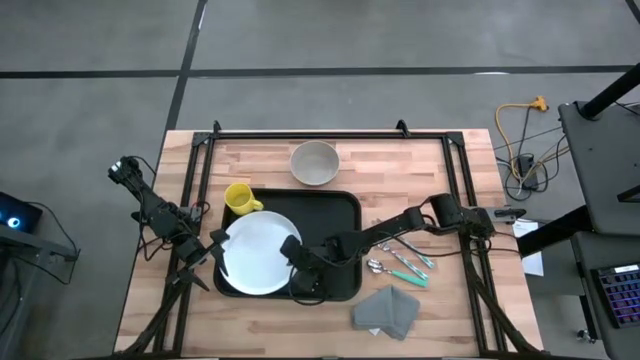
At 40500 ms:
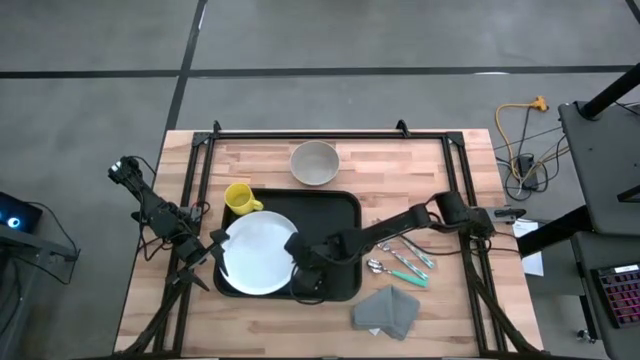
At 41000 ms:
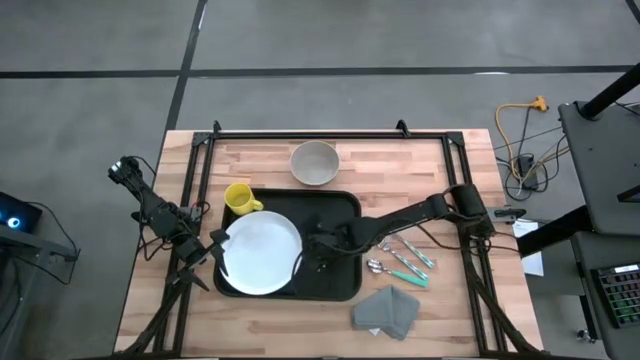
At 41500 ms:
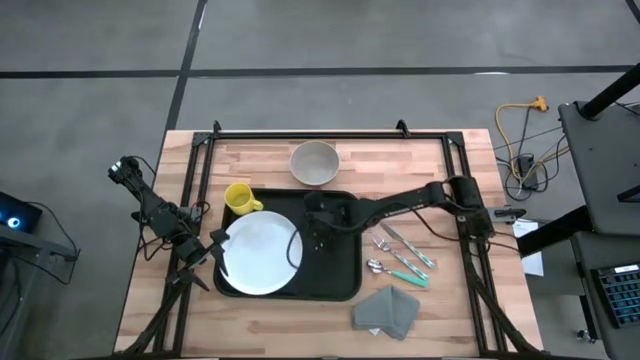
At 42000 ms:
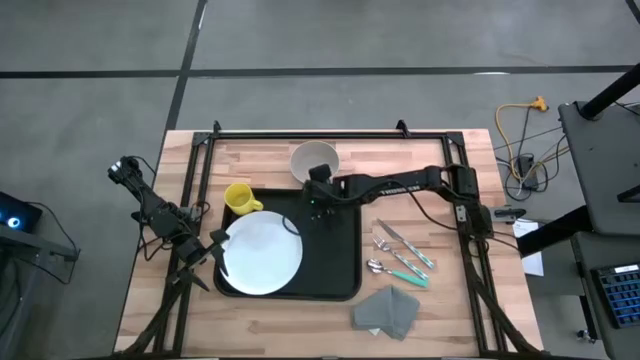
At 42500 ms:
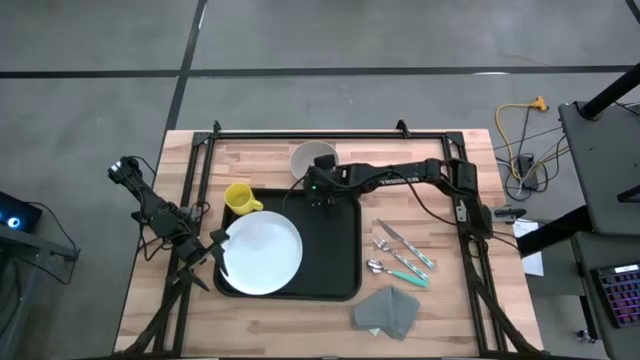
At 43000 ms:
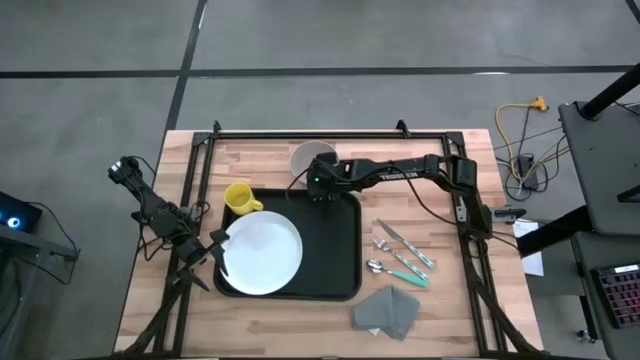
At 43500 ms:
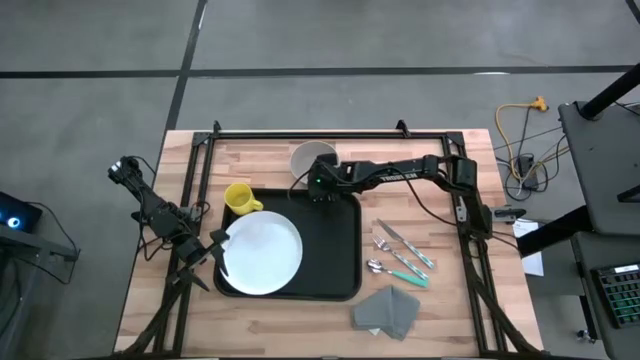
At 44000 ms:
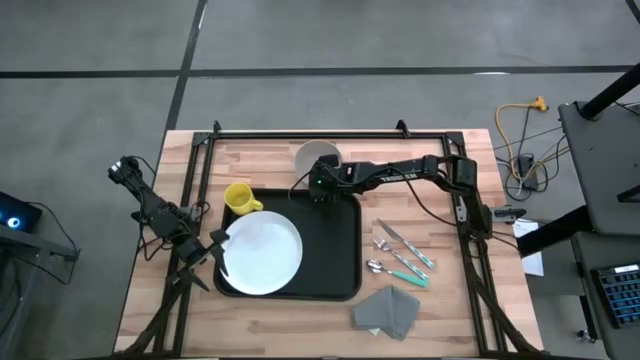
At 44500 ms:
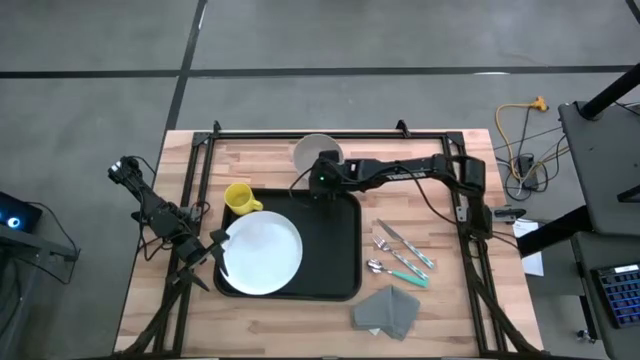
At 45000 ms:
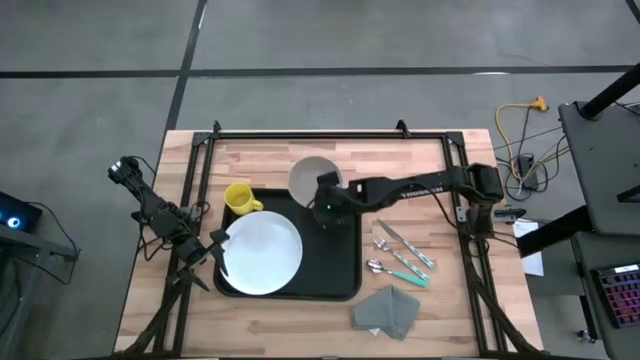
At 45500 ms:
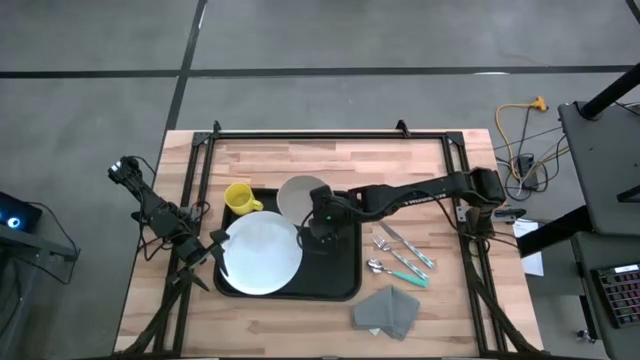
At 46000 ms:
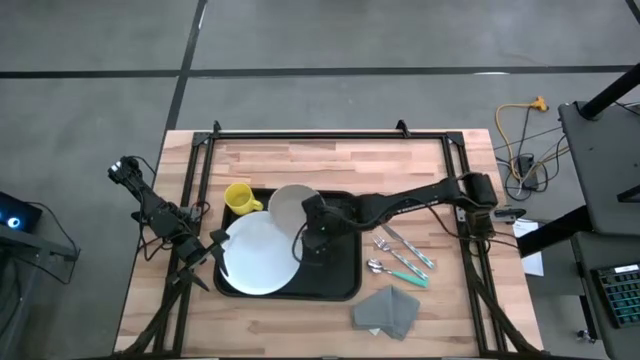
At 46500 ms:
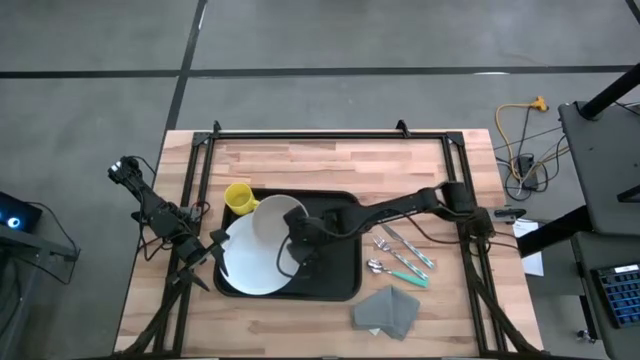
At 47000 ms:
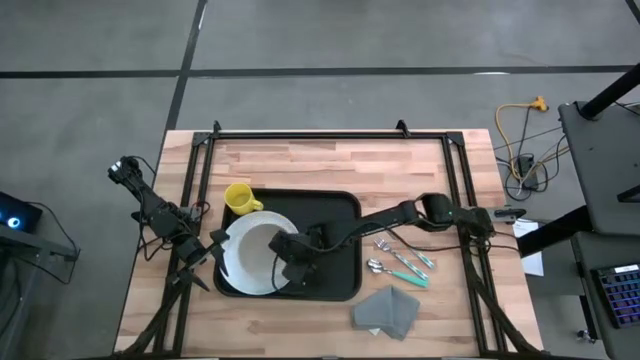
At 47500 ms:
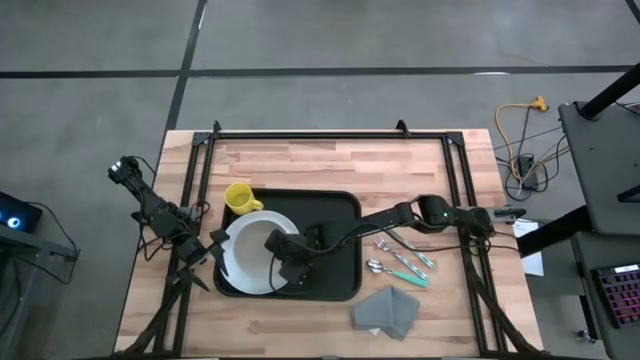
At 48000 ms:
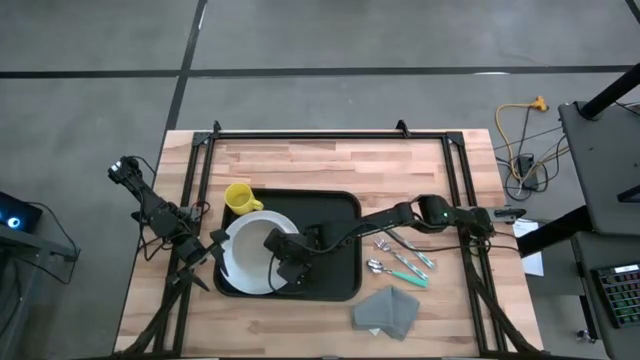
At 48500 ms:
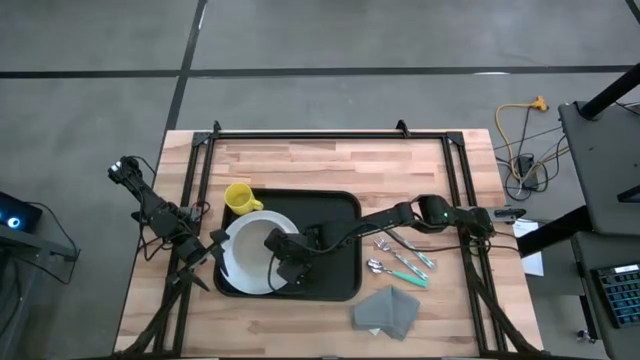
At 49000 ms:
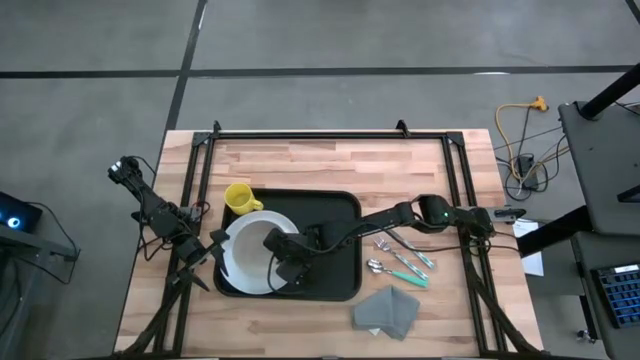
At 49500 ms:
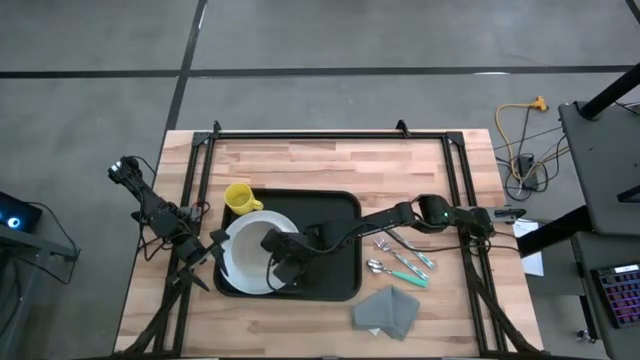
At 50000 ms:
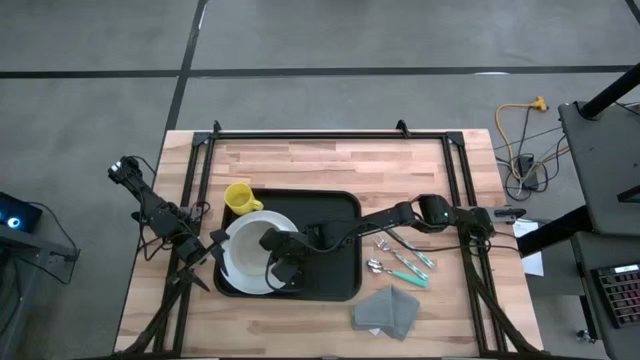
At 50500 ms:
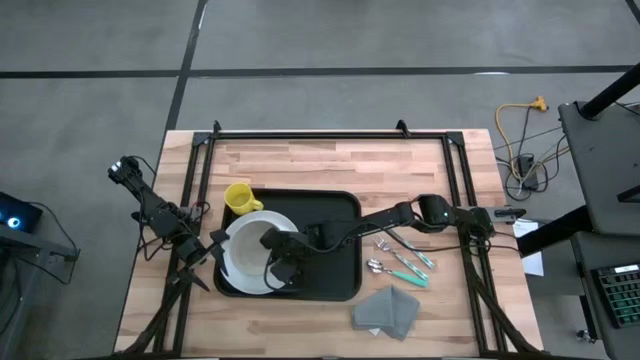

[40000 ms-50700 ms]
Task: Set up tray
Put the gray bowl on top of the white plate

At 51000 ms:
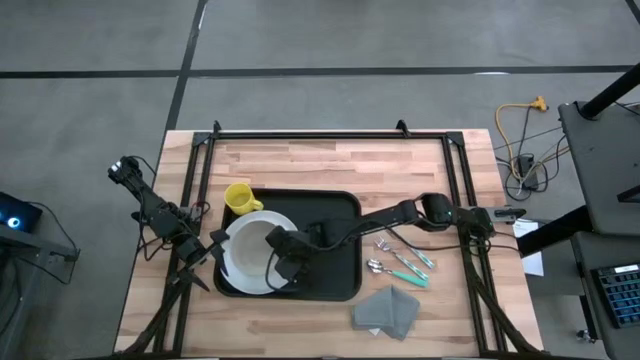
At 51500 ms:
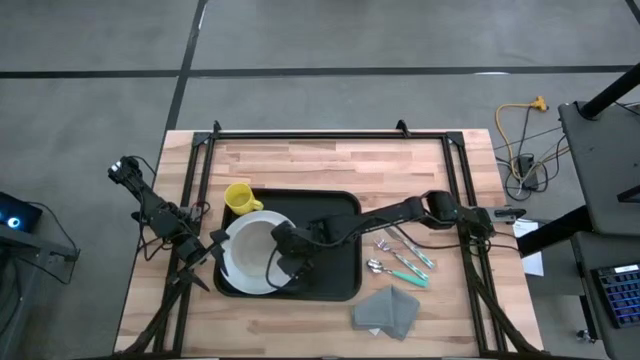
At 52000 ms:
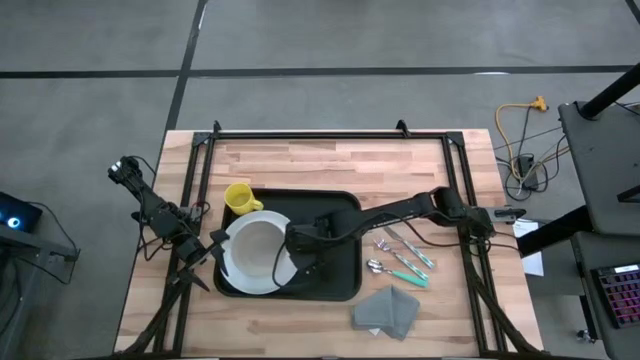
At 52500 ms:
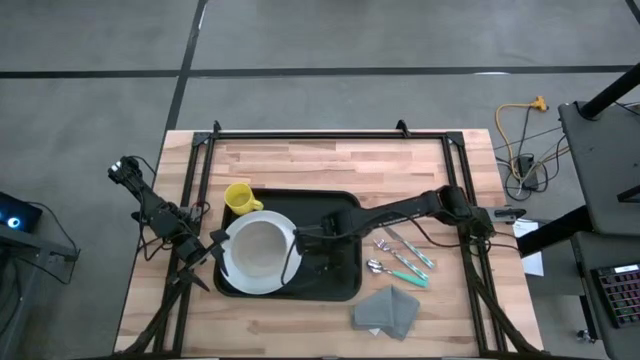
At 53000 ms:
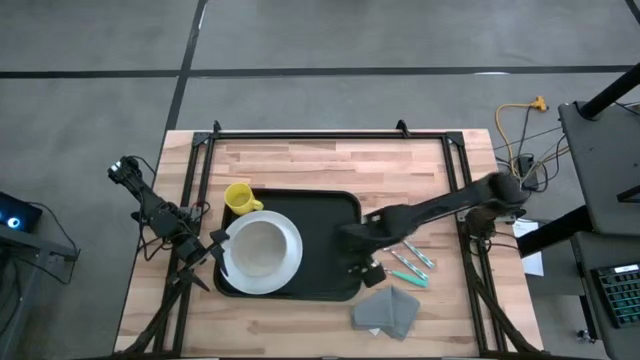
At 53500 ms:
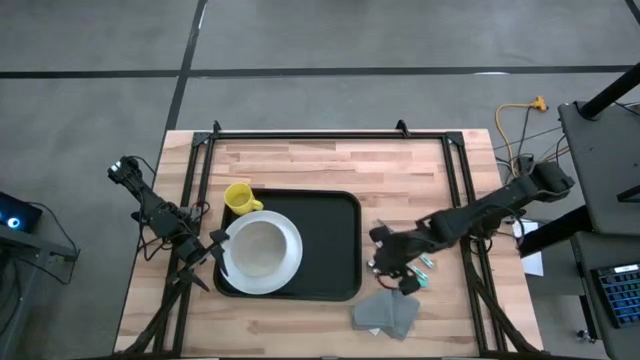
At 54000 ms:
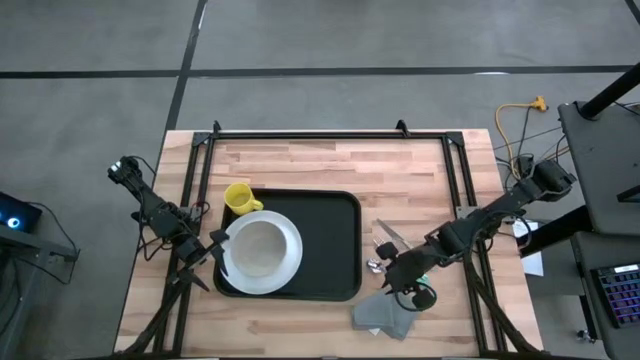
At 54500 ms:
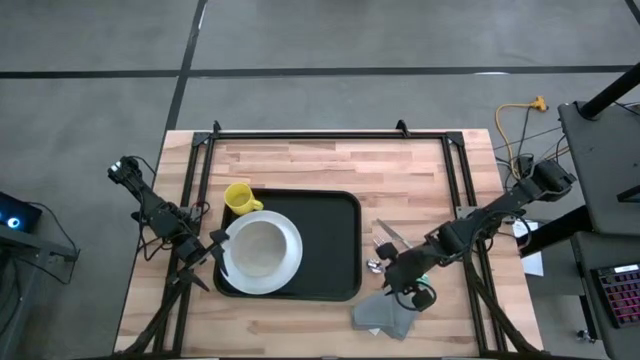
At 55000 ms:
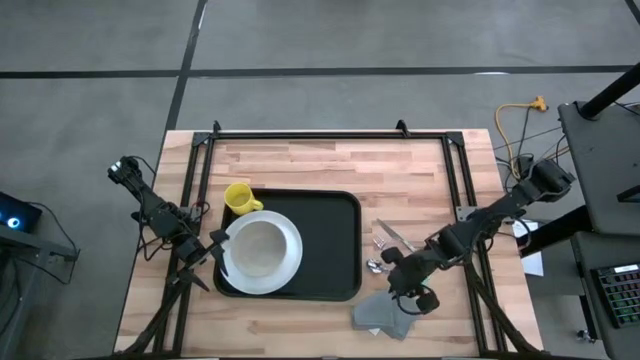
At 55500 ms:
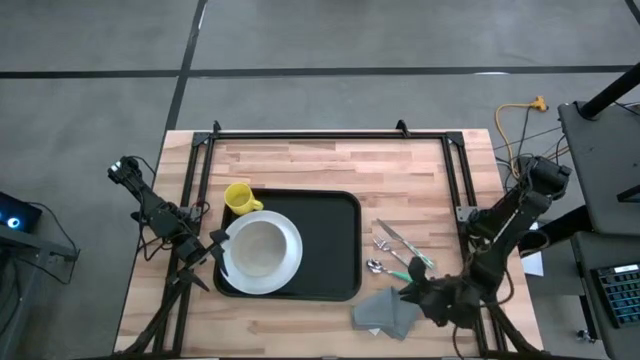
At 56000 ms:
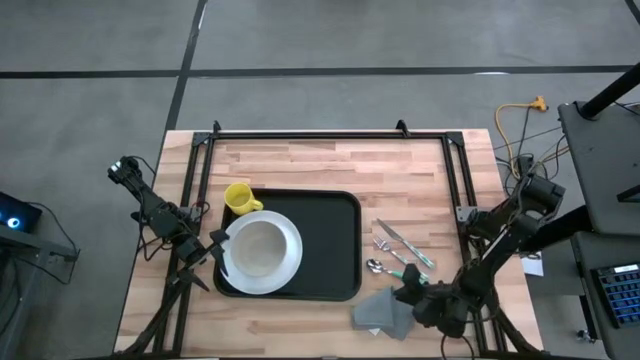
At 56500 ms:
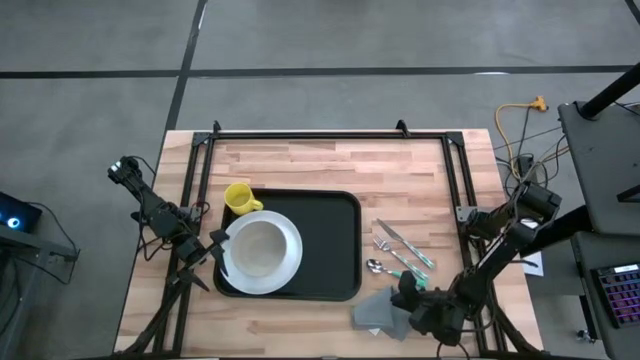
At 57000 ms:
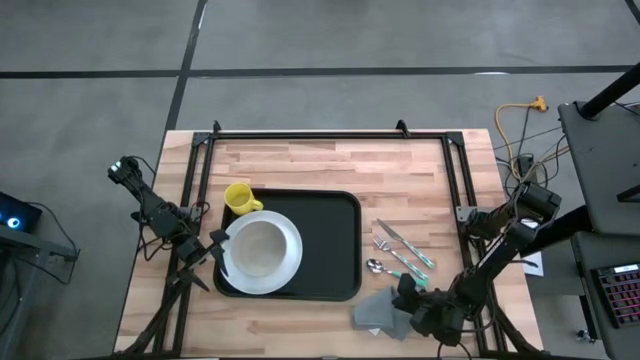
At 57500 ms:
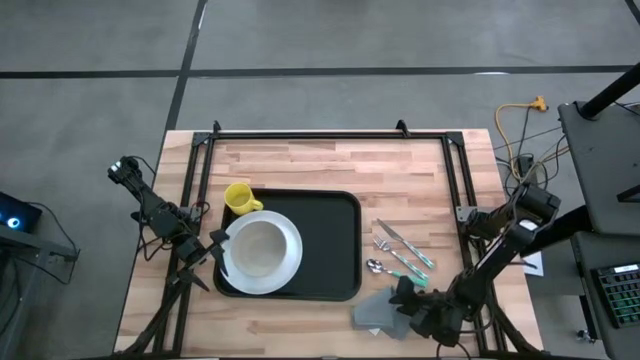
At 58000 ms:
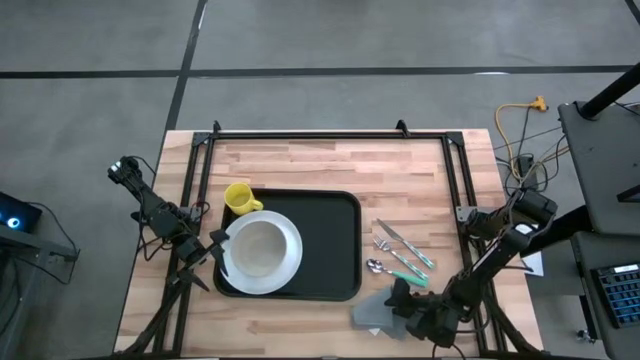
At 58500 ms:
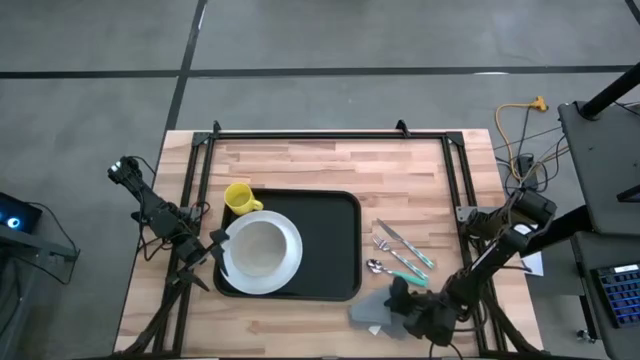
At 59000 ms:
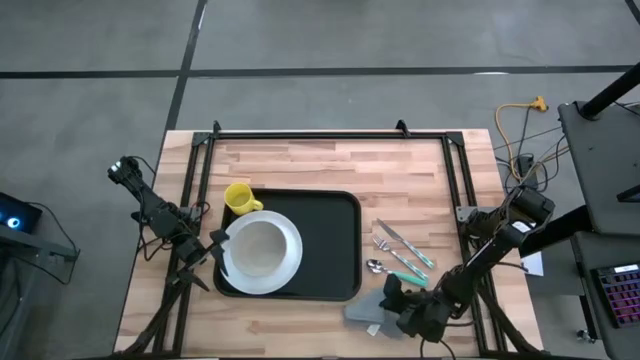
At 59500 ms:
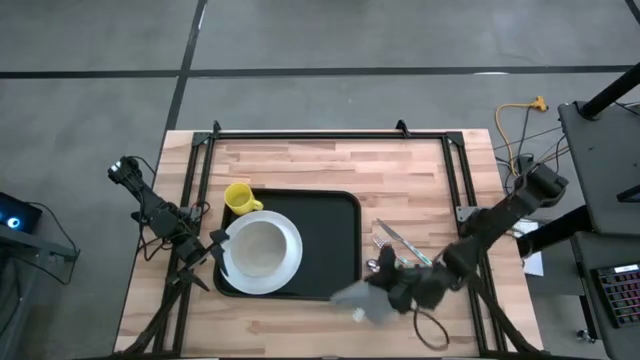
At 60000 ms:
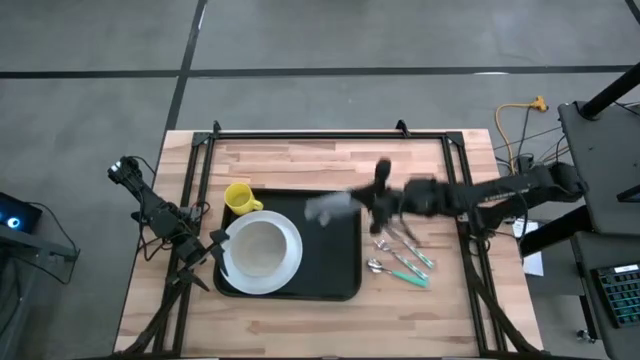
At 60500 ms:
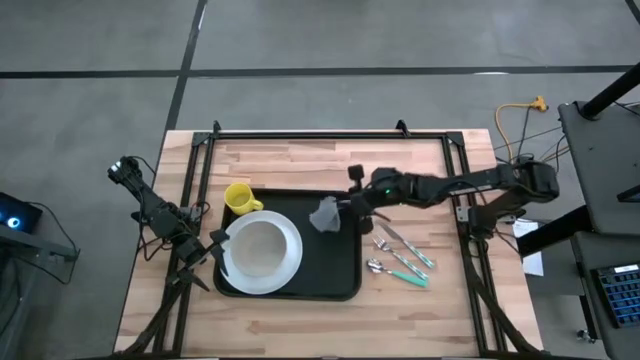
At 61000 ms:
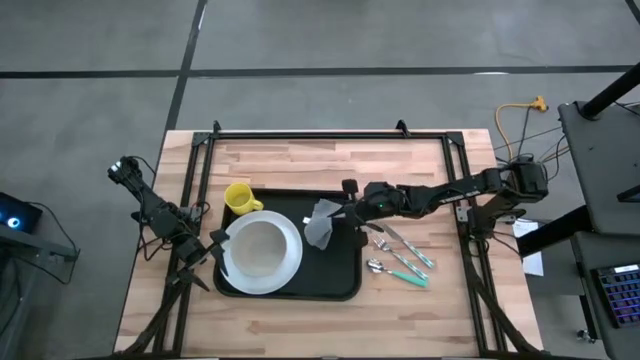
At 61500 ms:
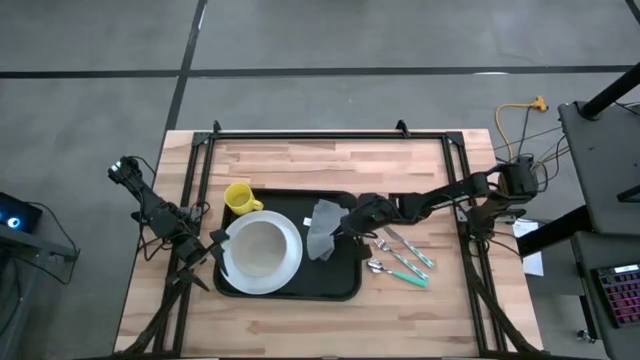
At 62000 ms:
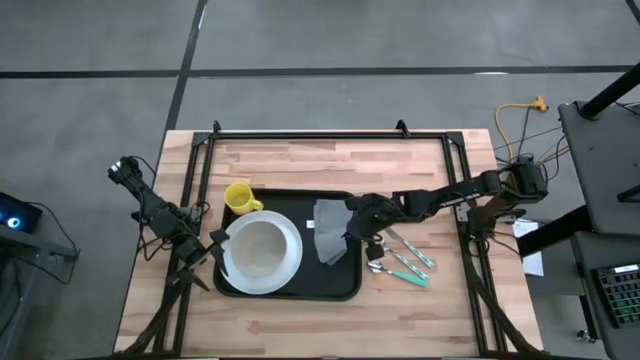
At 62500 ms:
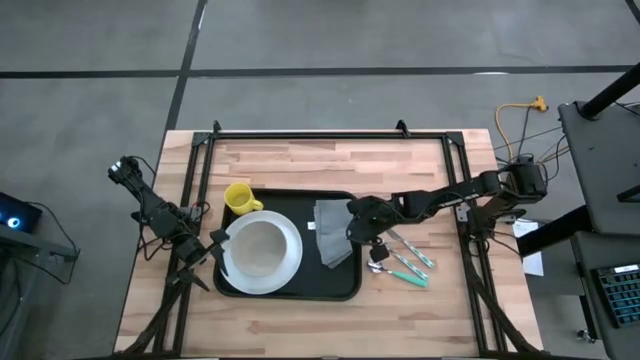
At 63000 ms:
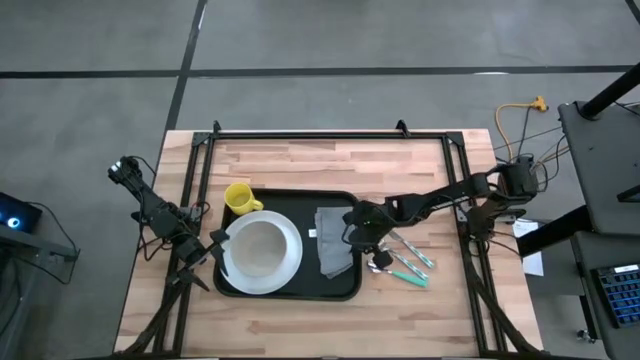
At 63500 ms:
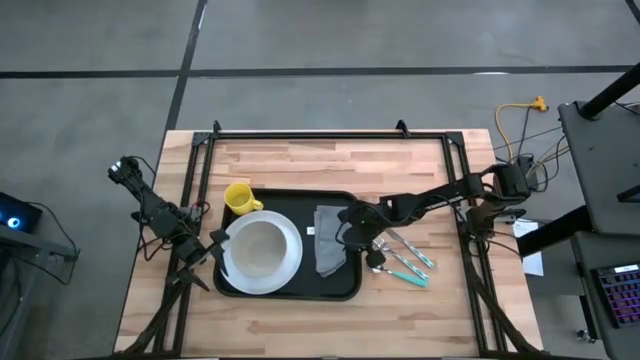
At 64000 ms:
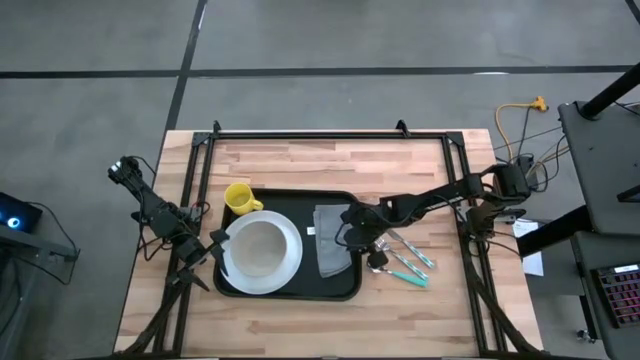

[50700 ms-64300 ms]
Put the gray napkin on the black serving tray to the right of the white plate
